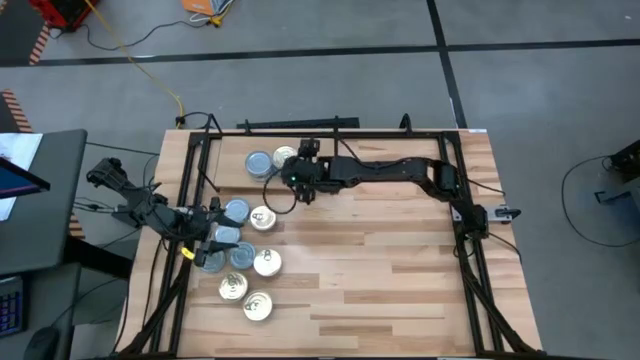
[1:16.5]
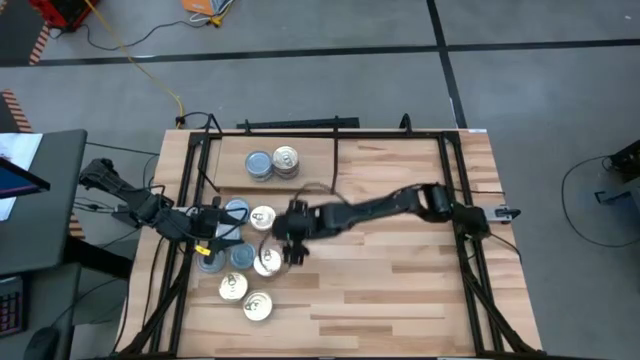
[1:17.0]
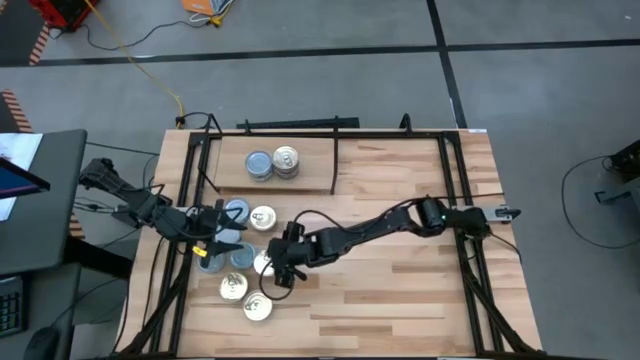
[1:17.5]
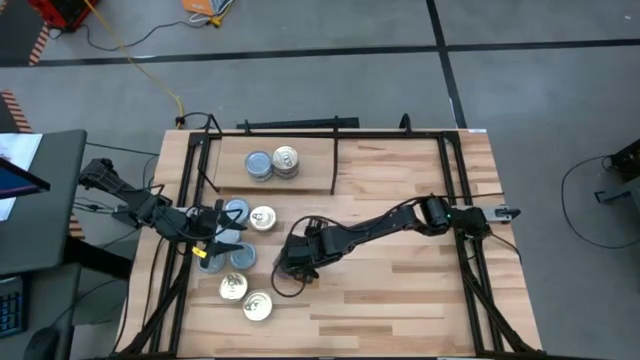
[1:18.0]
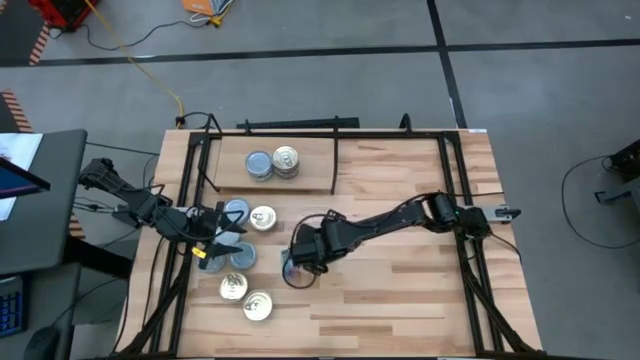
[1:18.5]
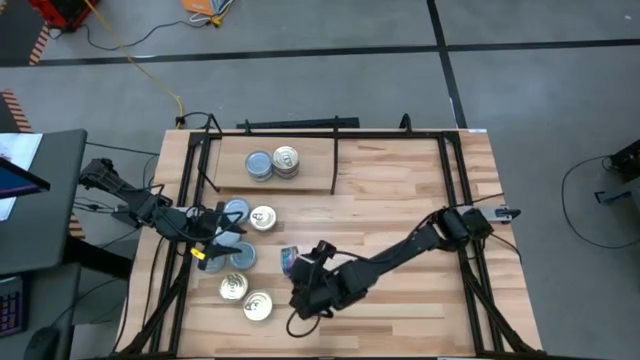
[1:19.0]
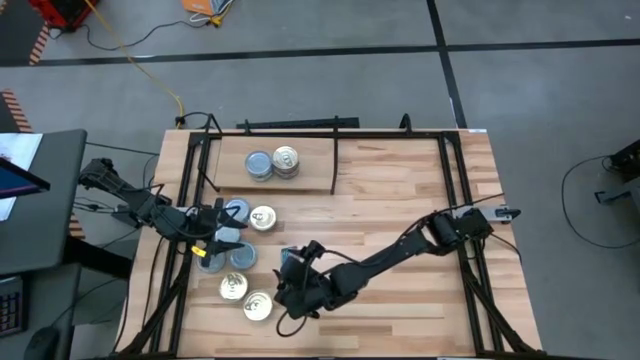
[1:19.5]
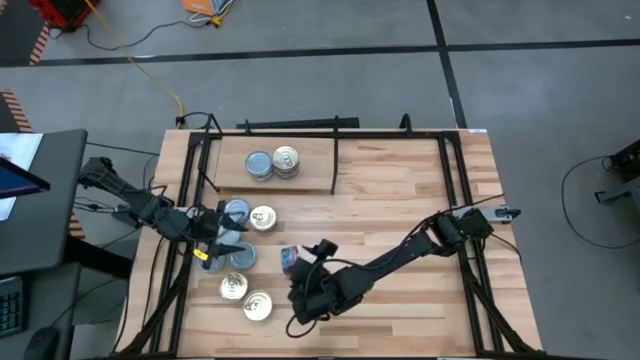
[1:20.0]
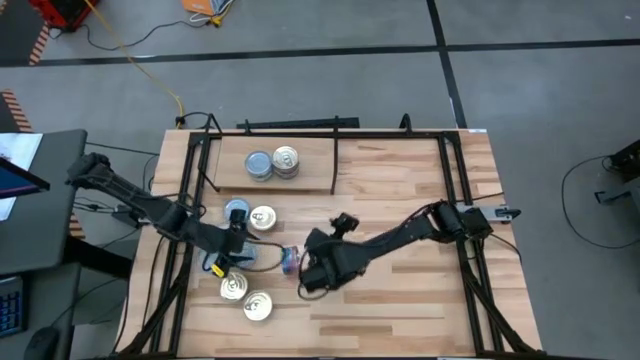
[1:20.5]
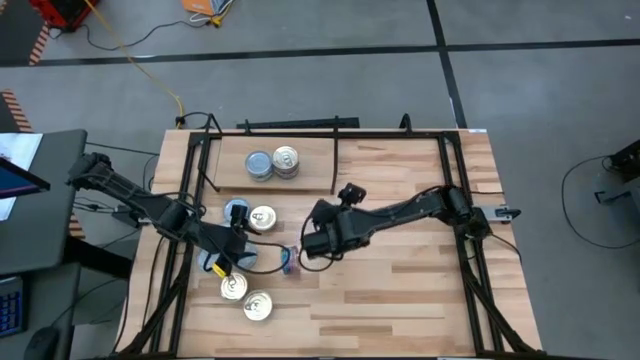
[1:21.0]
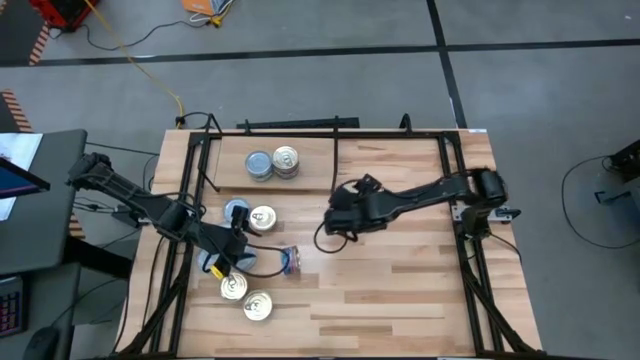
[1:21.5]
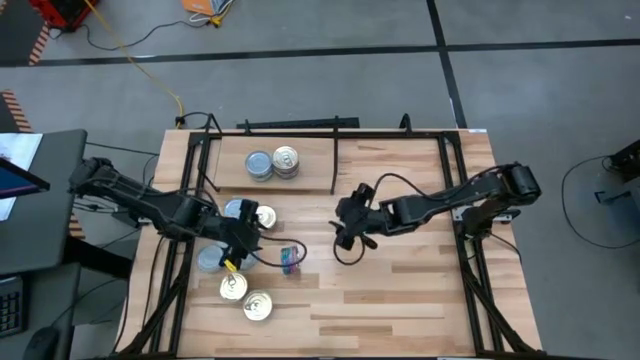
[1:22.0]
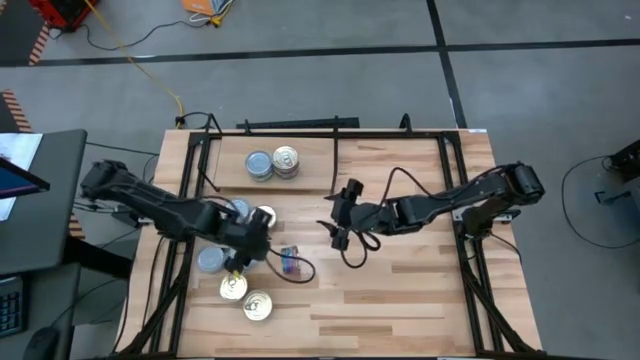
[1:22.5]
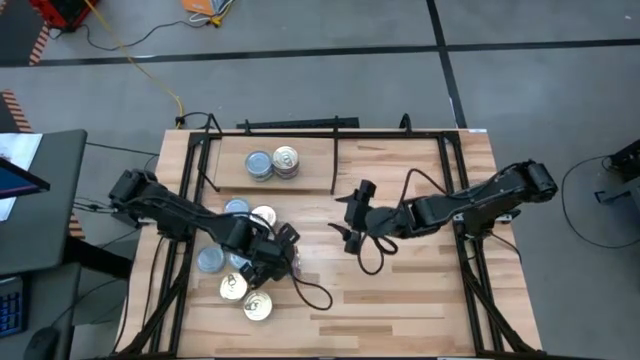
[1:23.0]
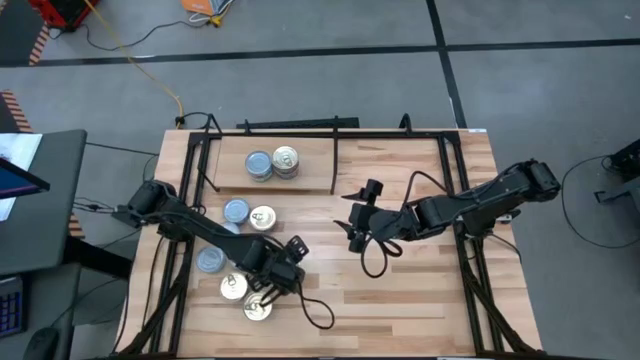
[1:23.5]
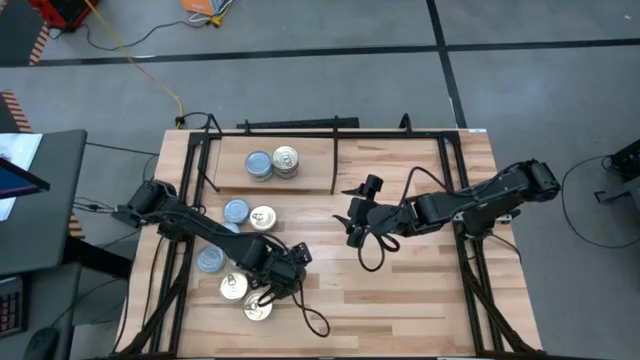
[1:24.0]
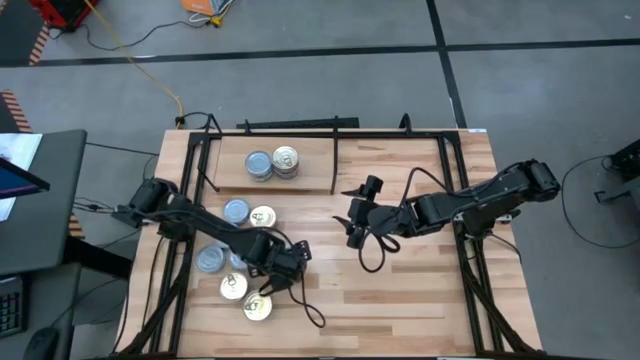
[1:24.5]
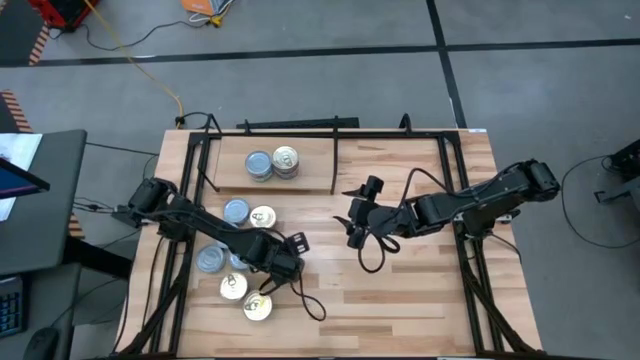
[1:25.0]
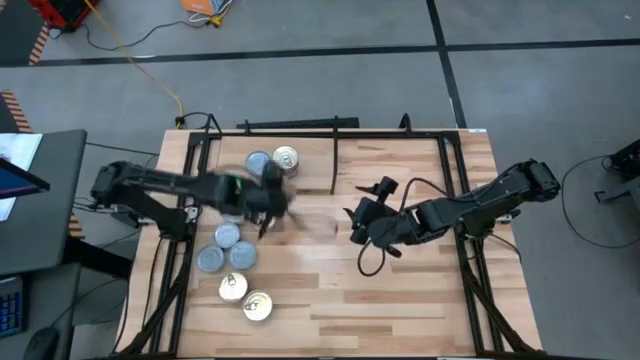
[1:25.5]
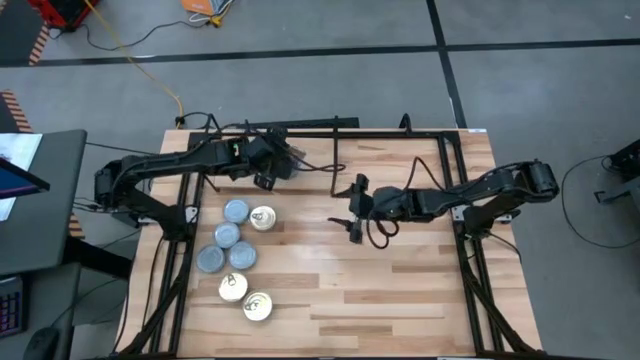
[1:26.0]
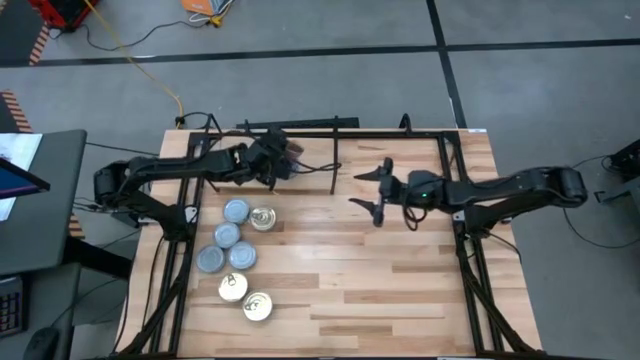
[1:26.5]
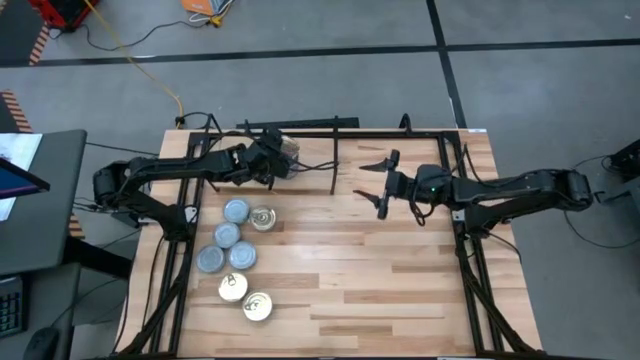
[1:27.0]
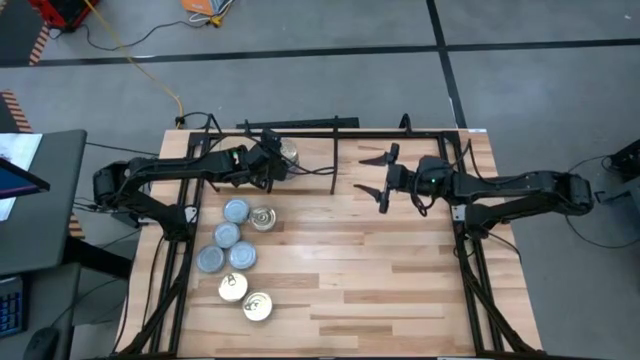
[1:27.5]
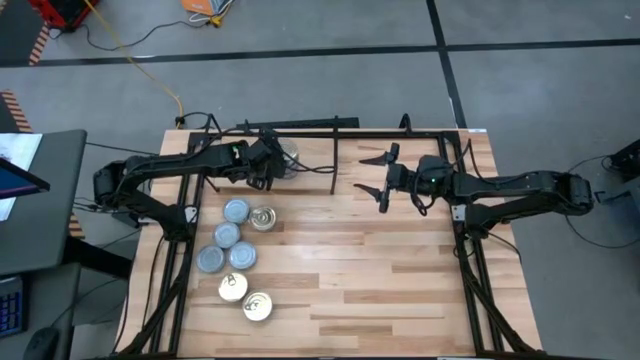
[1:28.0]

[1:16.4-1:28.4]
Task: Stack canned seafood by type on shelf
Stack the blue pink tuna can on top of the blue pink tuna cans on the shelf

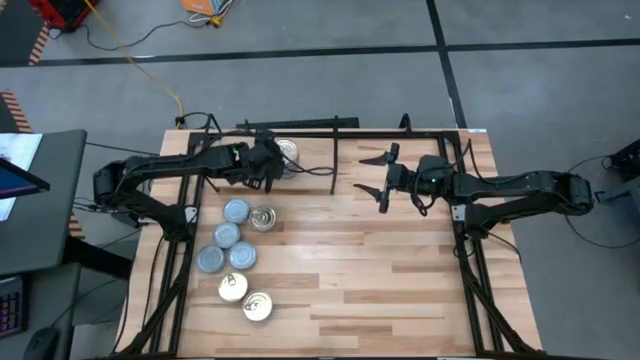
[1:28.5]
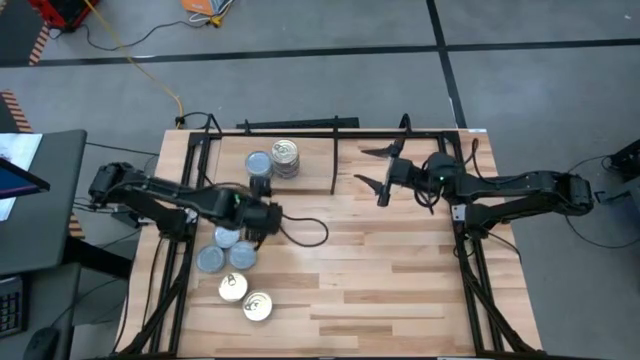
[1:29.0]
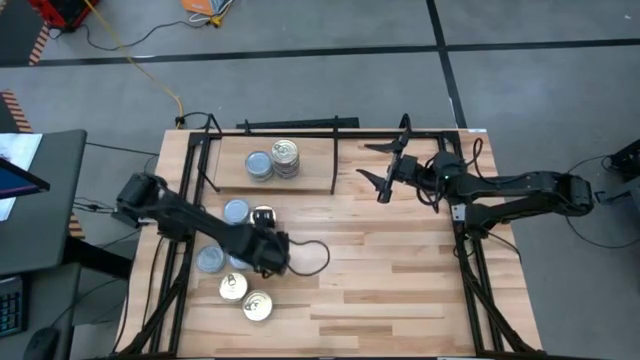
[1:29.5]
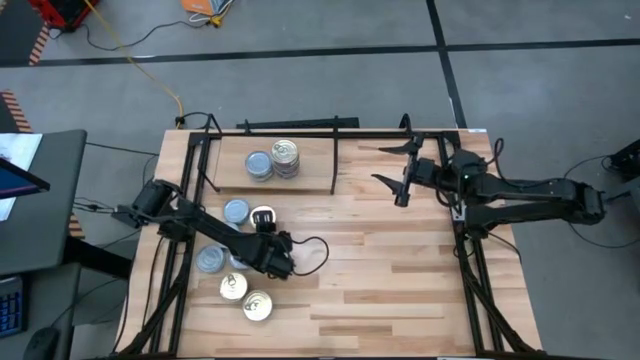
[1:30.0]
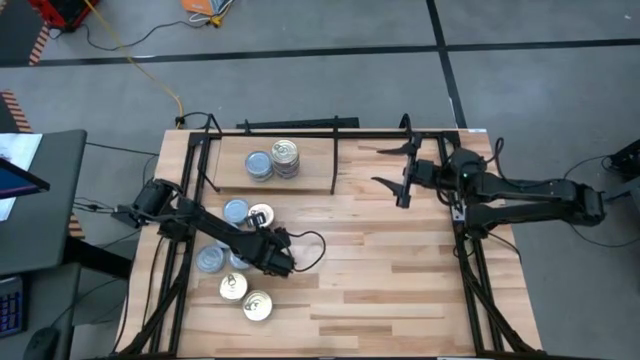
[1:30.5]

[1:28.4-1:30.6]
Stack the blue pink tuna can on top of the blue pink tuna cans on the shelf

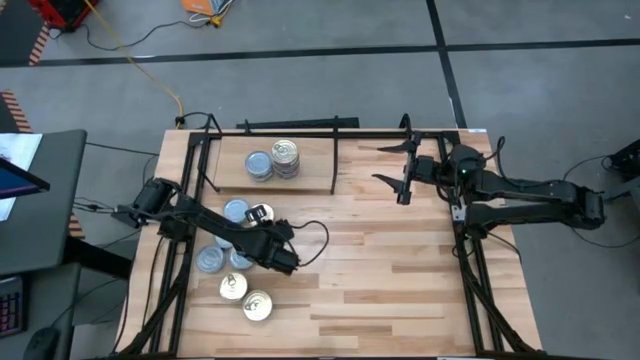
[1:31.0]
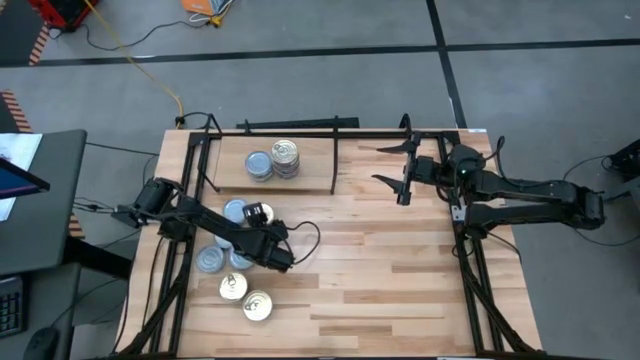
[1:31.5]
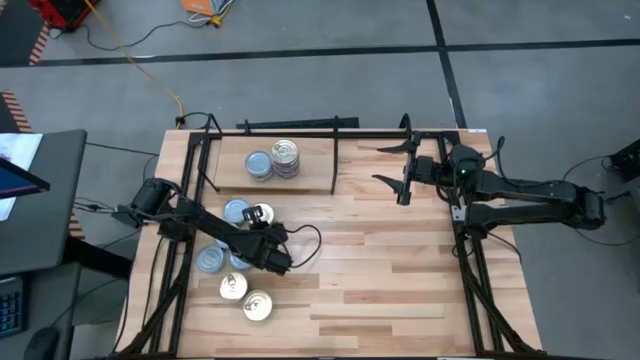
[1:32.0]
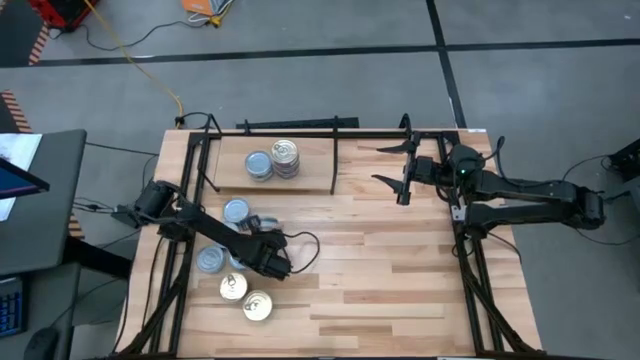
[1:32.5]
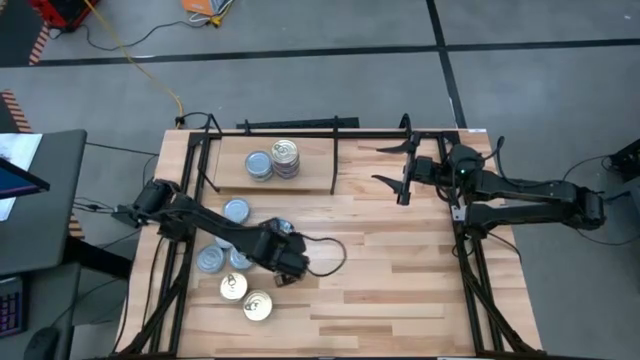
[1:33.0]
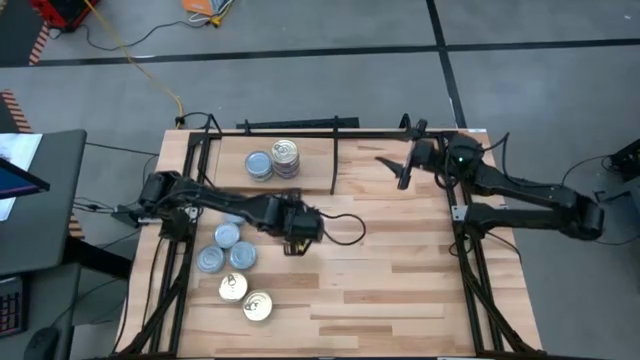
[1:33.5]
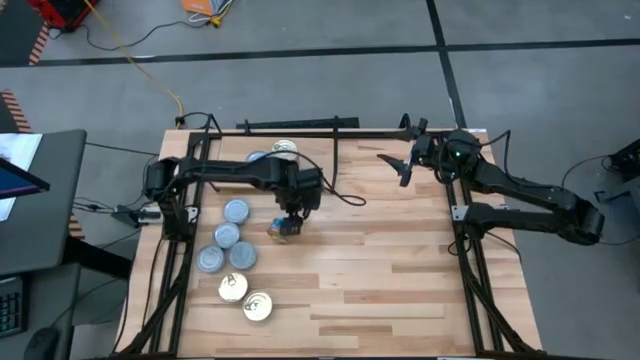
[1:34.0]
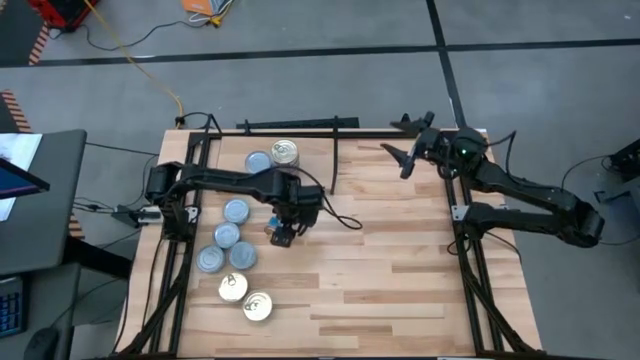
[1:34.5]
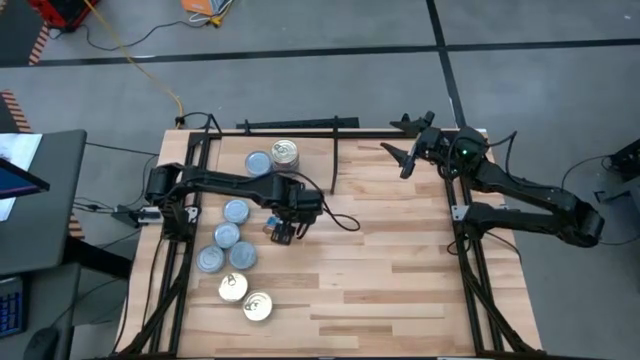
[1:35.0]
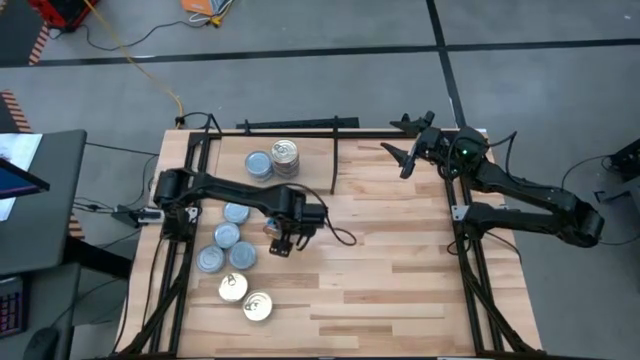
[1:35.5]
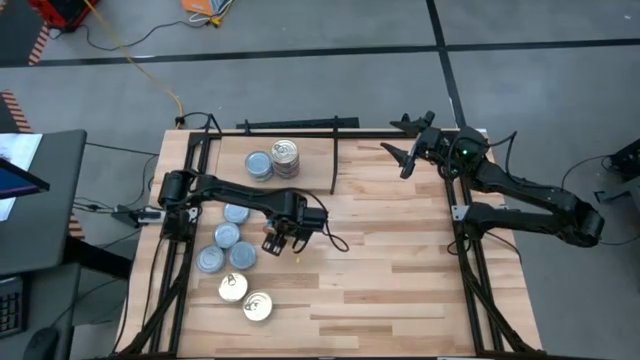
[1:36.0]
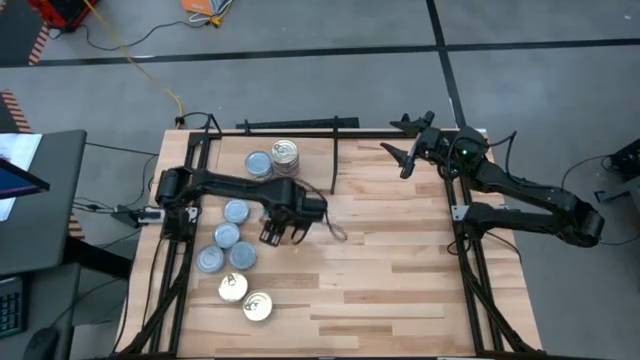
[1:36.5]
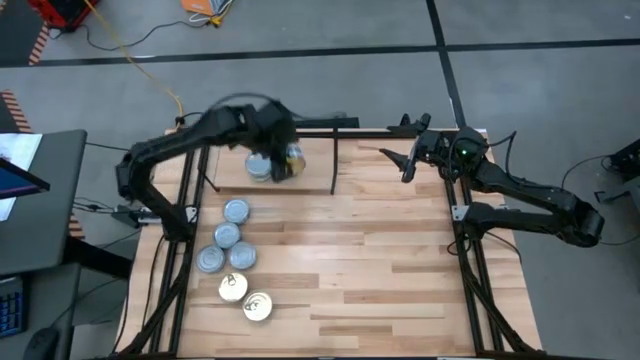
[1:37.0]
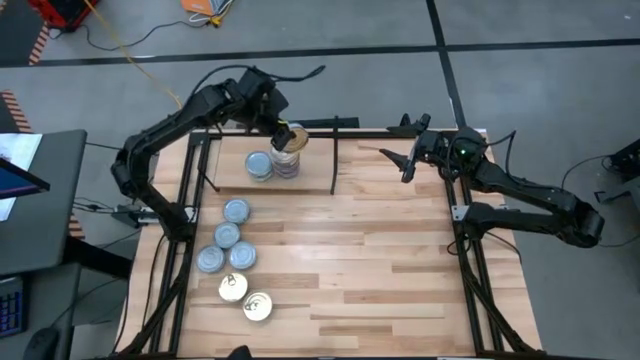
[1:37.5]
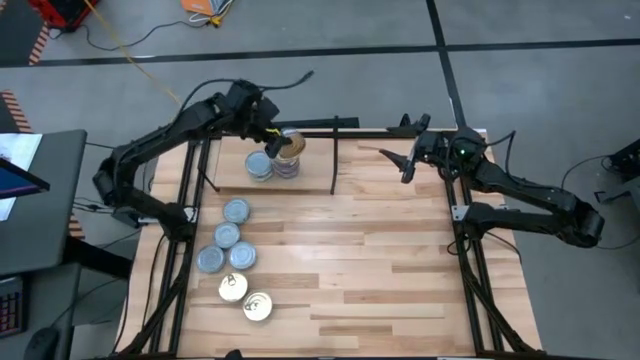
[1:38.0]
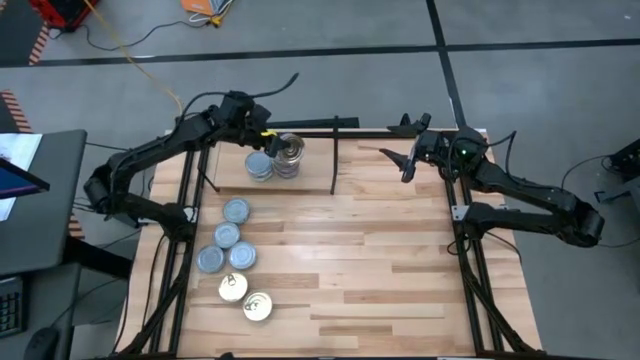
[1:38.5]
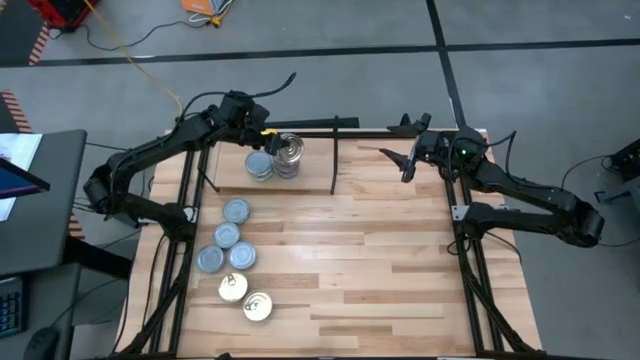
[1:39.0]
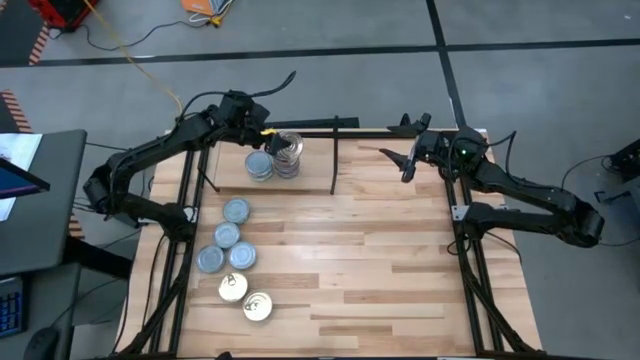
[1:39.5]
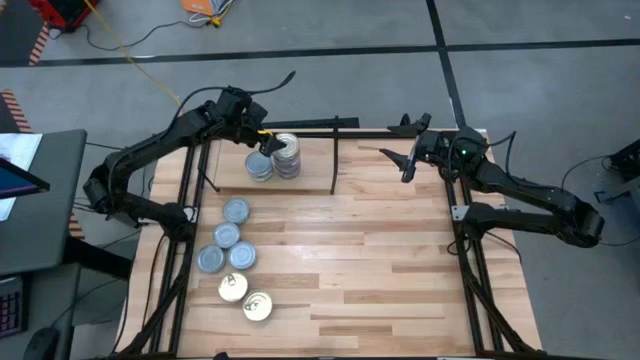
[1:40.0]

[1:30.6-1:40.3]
Stack the blue pink tuna can on top of the blue pink tuna cans on the shelf
